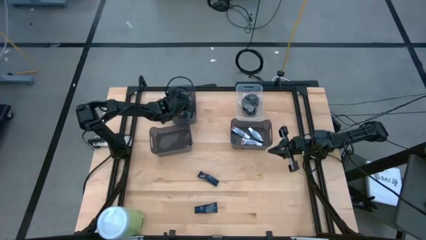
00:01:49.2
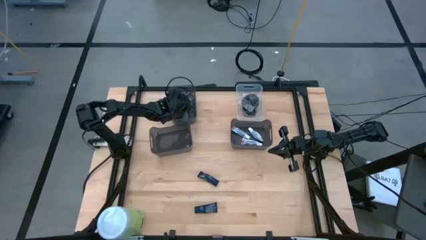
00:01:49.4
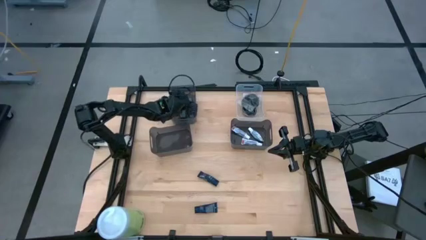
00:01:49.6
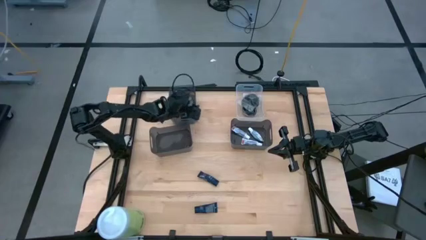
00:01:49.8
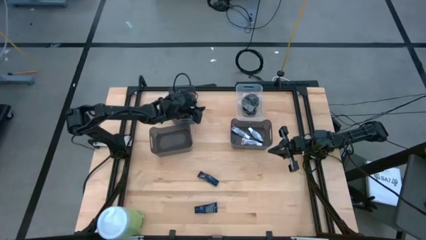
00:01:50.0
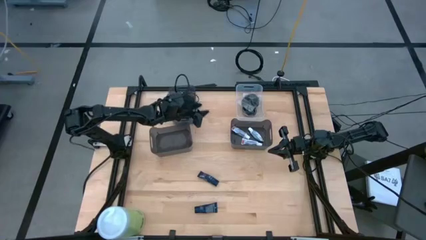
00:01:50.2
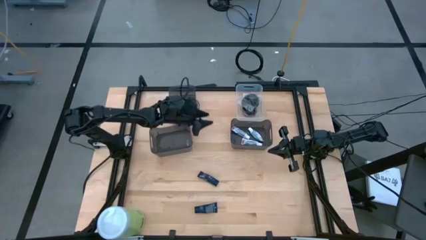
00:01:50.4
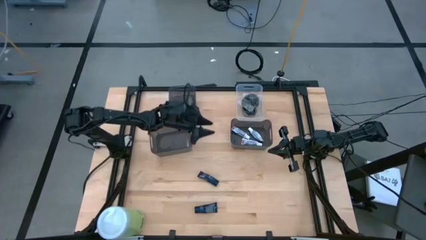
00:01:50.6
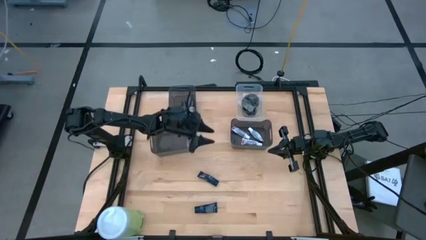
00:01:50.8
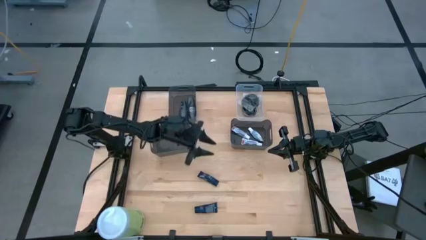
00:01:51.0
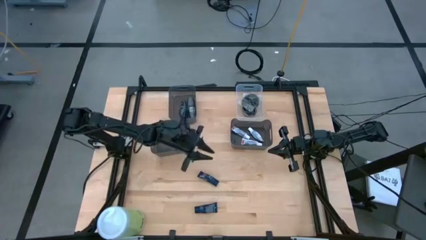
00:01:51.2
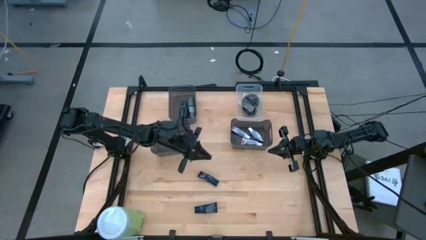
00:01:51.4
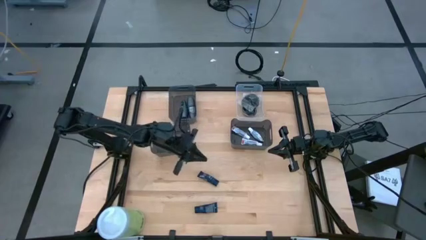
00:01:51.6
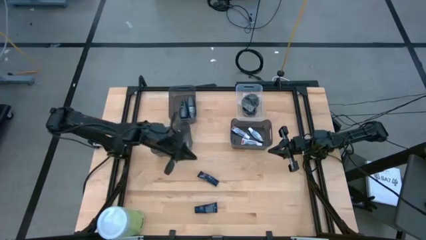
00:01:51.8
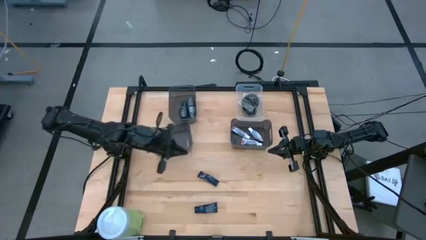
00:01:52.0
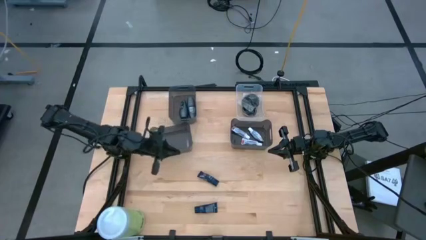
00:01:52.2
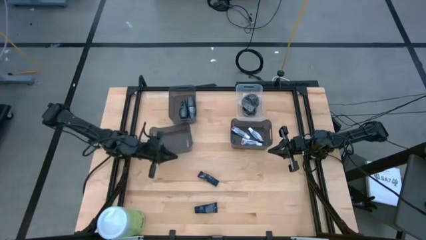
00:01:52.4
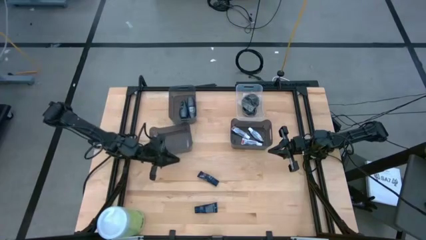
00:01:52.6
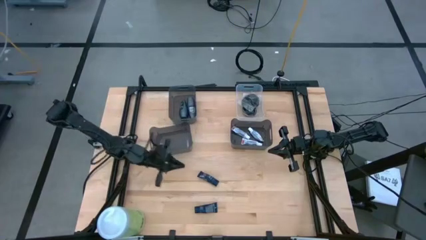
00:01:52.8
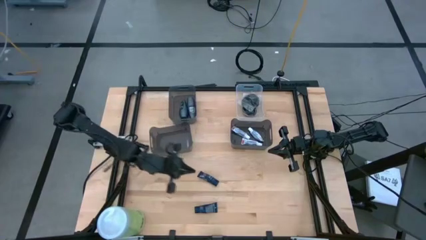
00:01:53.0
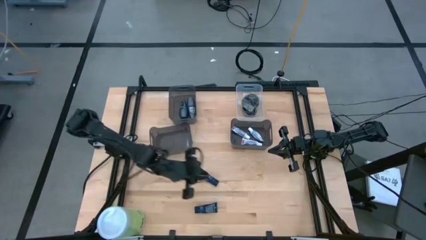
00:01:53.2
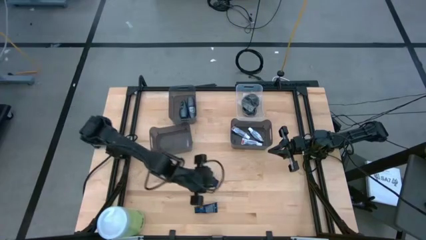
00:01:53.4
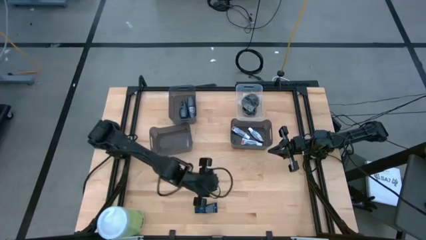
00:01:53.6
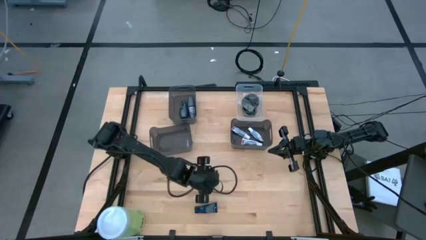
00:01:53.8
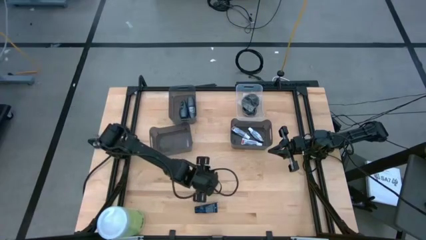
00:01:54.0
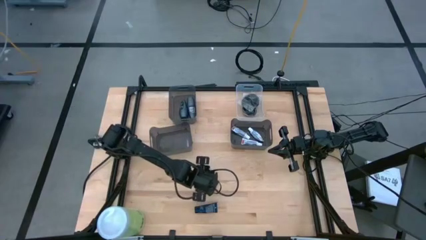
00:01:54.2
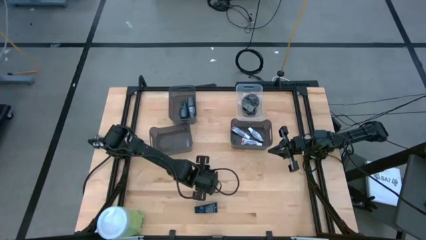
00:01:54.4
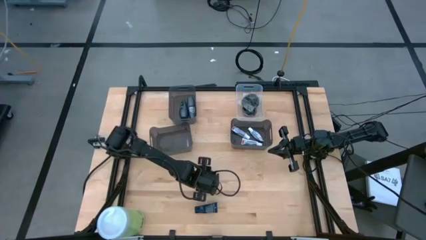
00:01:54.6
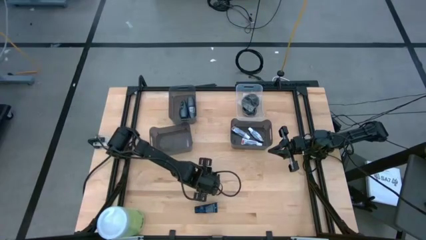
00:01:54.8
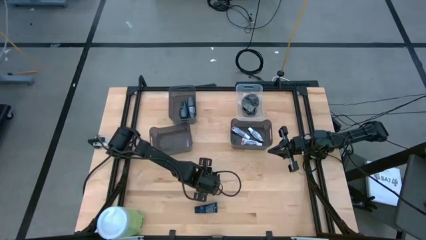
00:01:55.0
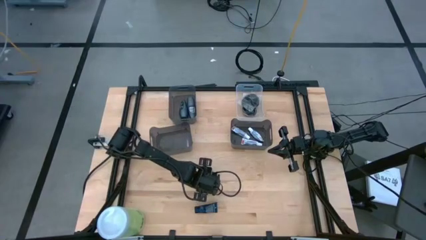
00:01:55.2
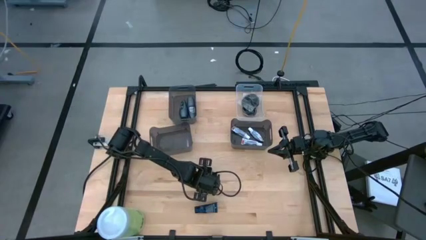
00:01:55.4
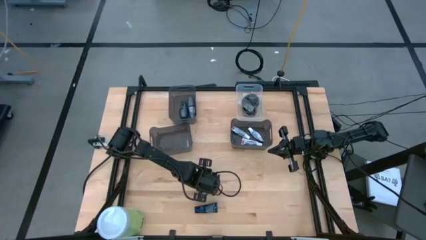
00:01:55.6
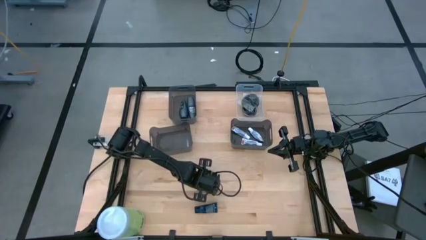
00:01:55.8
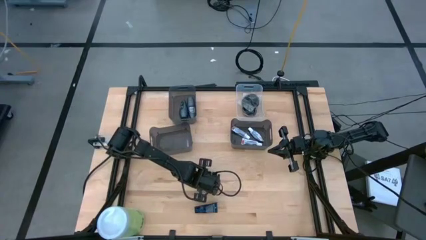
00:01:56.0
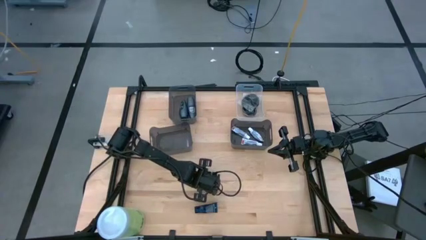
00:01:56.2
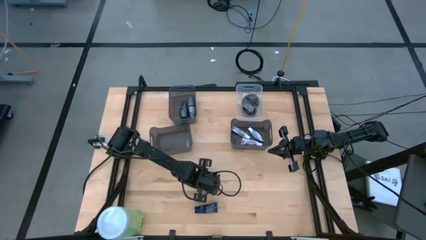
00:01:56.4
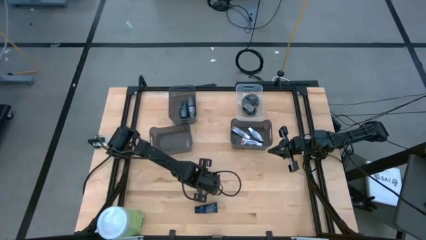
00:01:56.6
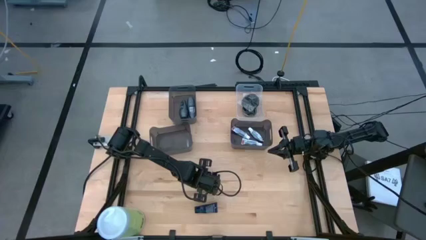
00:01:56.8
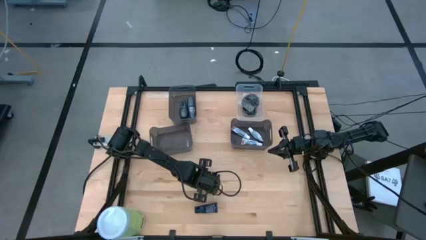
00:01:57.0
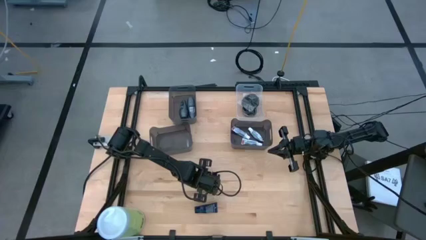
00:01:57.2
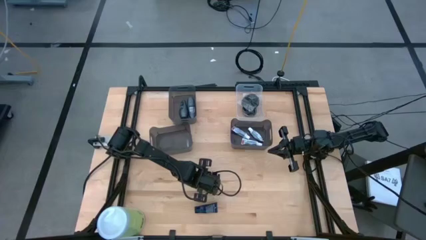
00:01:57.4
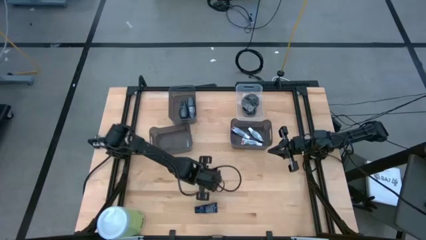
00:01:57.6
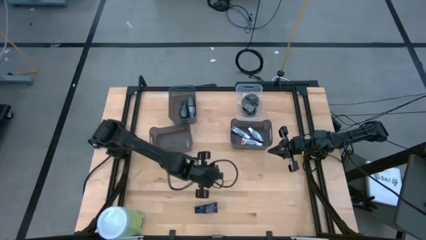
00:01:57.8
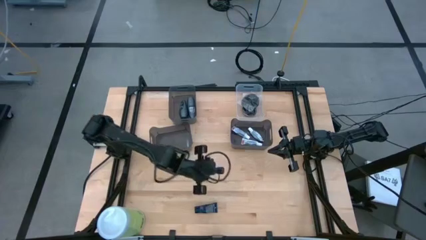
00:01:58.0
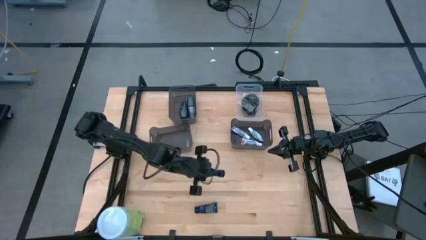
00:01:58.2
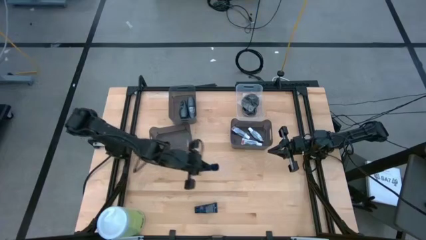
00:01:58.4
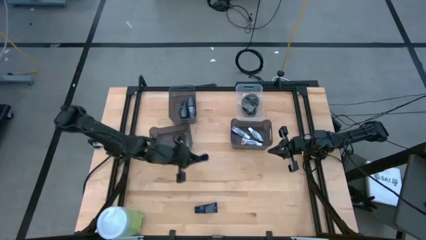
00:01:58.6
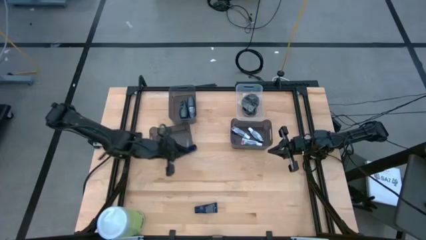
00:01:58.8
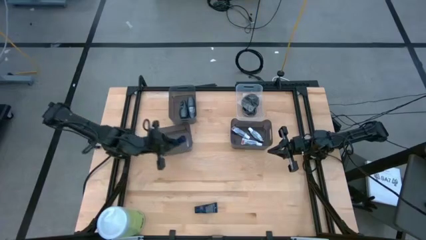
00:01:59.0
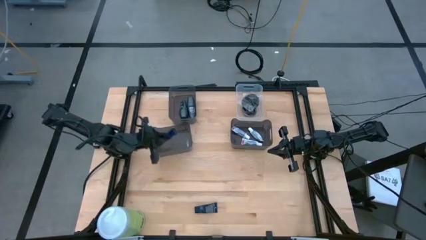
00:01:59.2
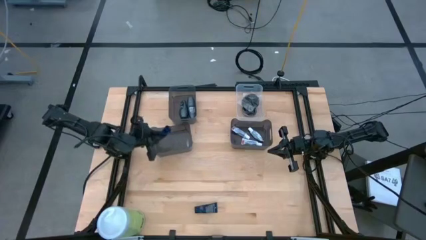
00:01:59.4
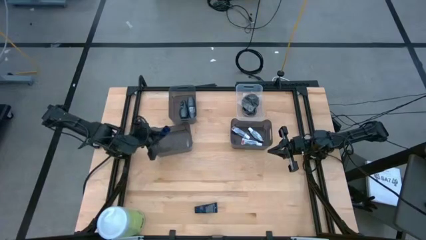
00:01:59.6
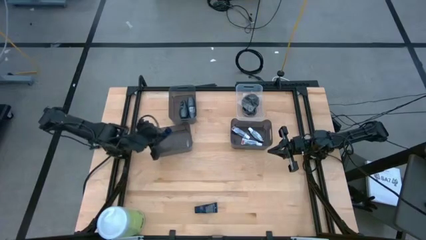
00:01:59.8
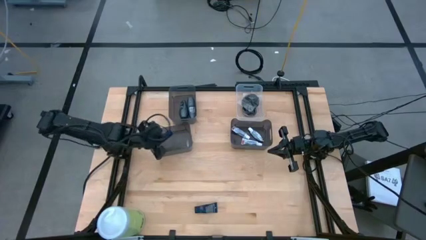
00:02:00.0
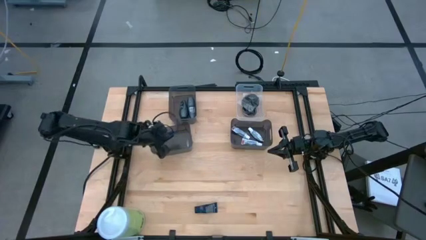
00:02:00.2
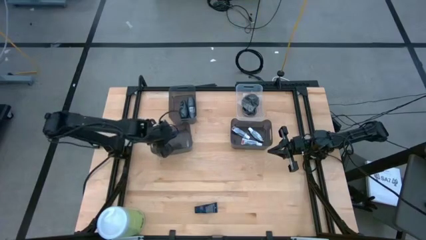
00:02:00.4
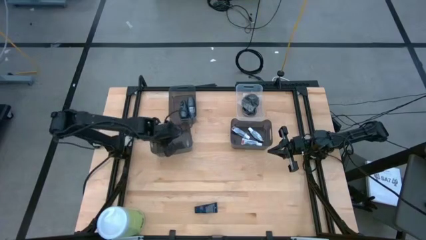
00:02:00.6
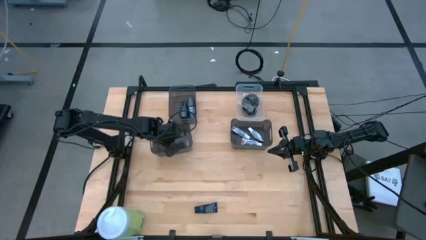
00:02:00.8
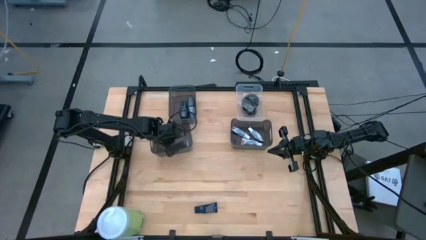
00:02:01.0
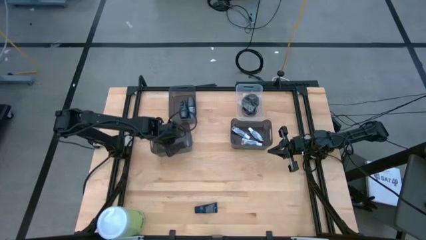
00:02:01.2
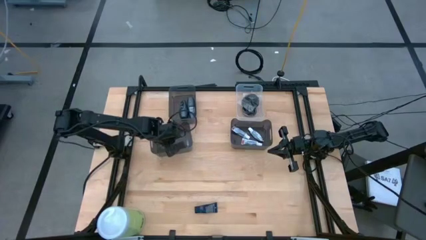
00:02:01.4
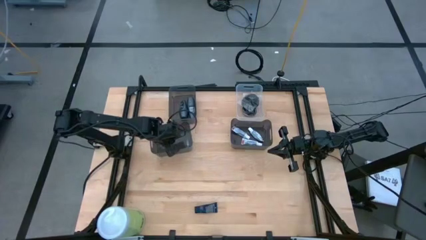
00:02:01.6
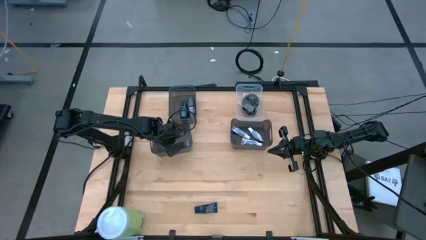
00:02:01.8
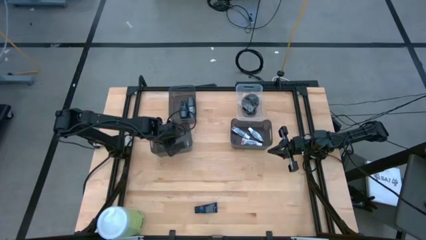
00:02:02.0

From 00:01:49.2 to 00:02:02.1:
Task: Pick & Place Travel size toiletries
Put the top dark blue shave cream into the bottom left black bin

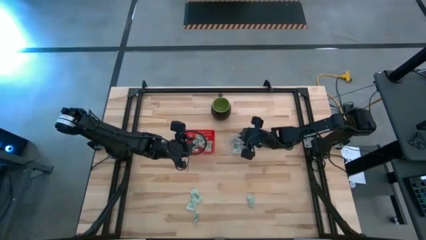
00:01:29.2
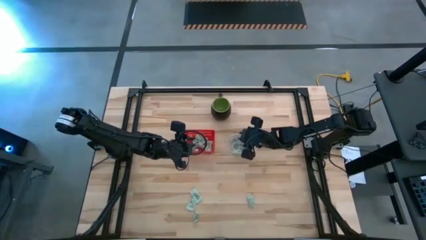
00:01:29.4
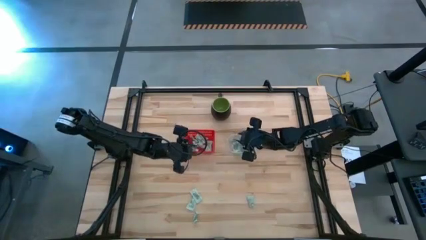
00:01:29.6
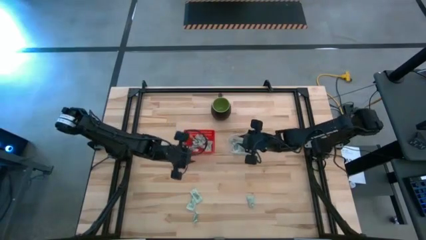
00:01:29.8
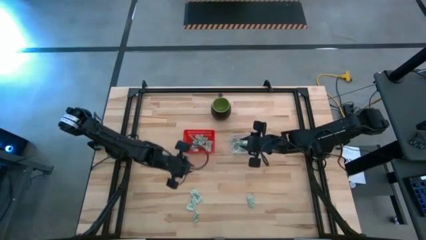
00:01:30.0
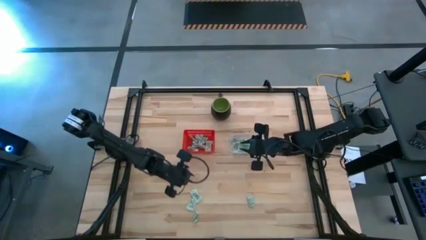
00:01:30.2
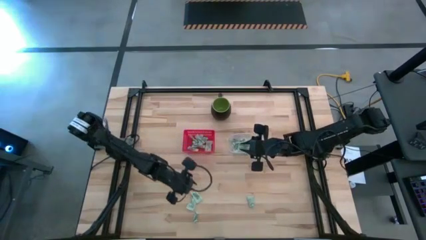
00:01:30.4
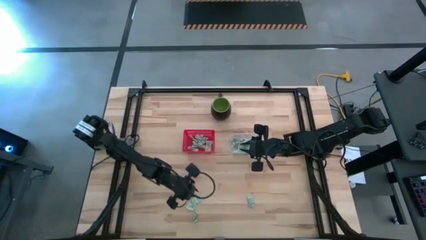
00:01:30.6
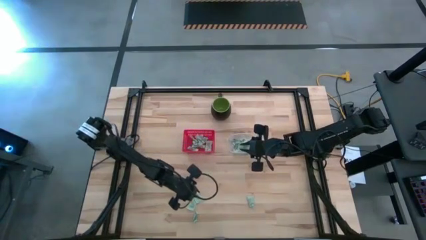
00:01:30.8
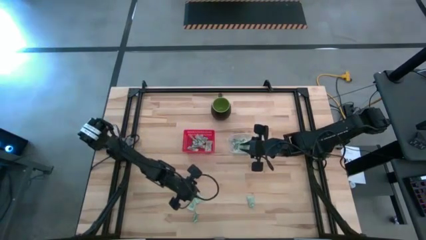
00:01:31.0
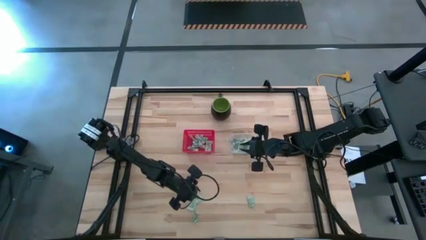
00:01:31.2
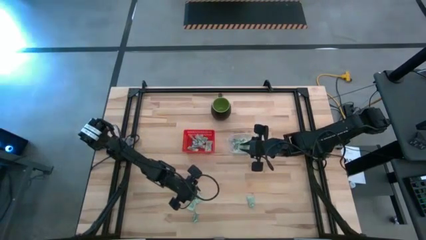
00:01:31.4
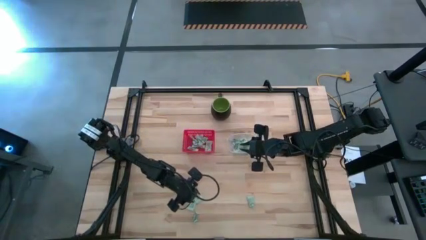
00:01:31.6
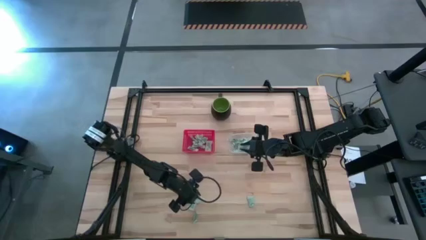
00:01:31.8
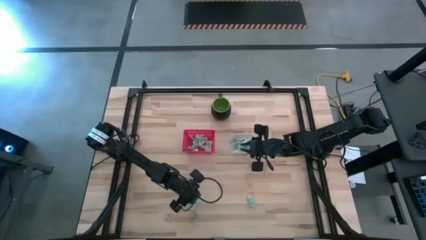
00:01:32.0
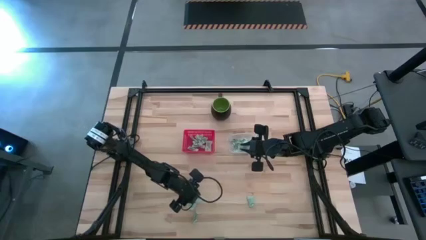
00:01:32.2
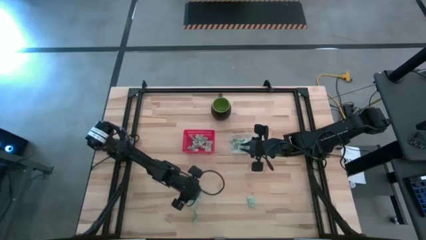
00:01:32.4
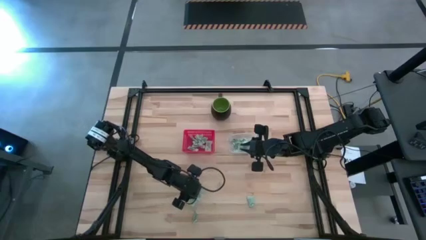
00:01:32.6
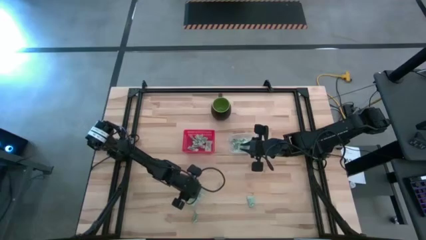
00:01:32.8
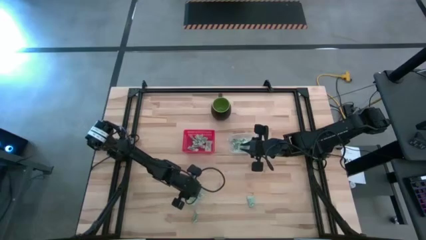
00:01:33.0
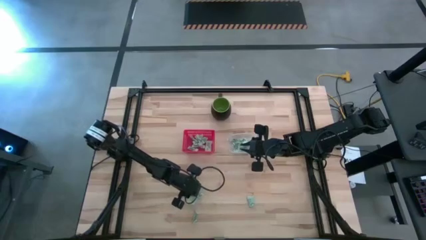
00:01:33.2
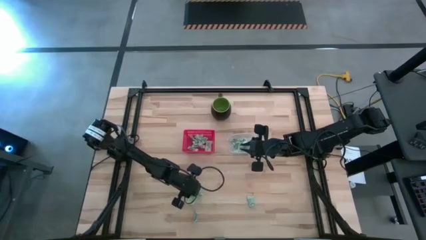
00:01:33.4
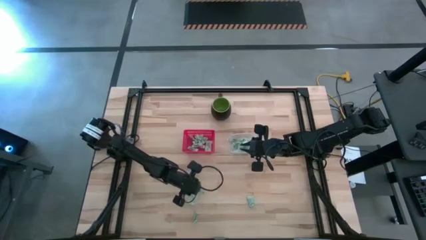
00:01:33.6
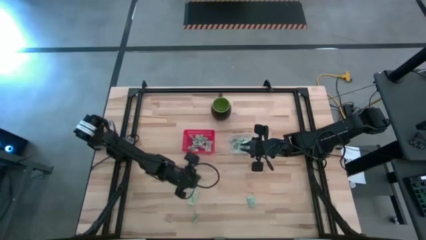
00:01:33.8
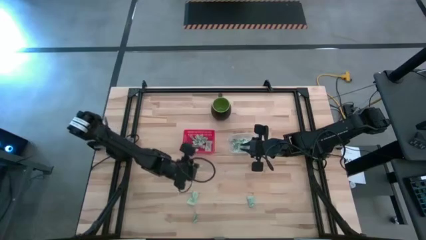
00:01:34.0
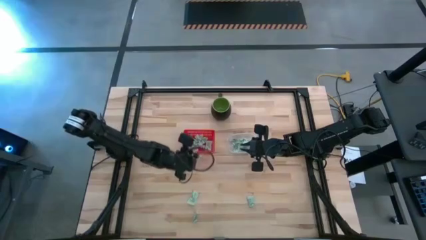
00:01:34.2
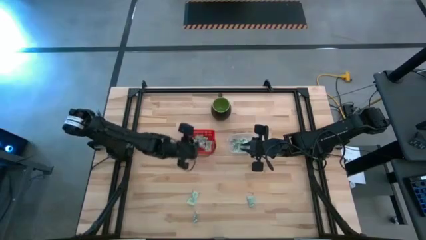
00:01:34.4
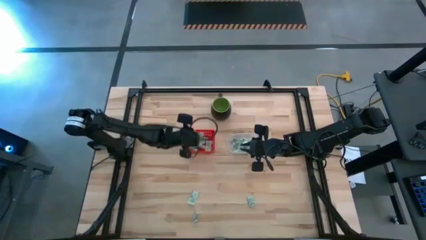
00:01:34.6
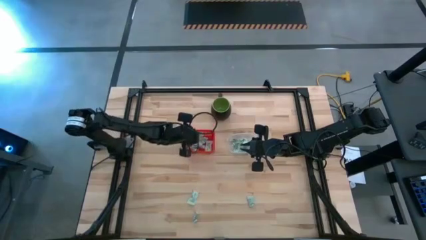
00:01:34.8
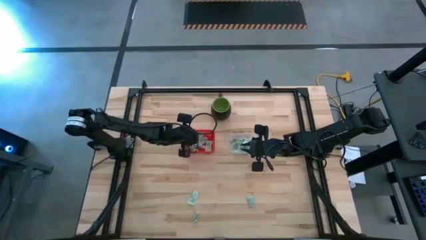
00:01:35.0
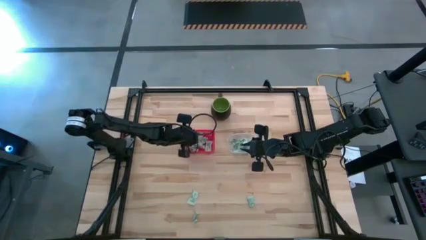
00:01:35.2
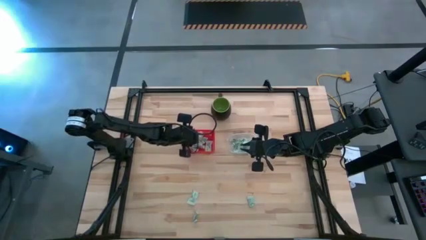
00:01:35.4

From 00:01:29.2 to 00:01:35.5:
Task: Pick and place items into bin
Put the stevia packet into the red bin
